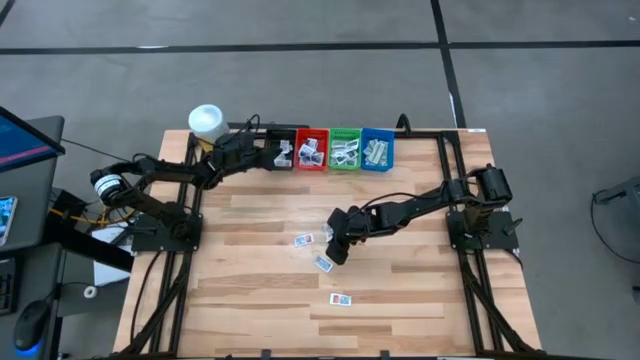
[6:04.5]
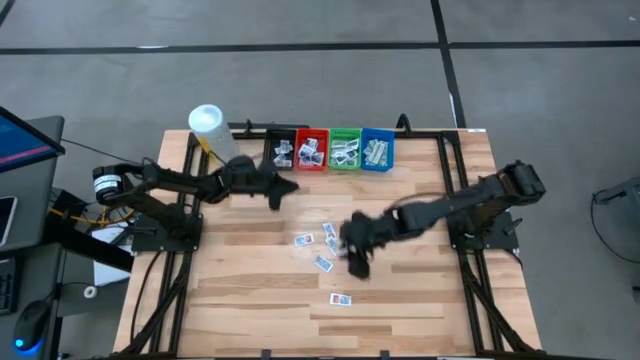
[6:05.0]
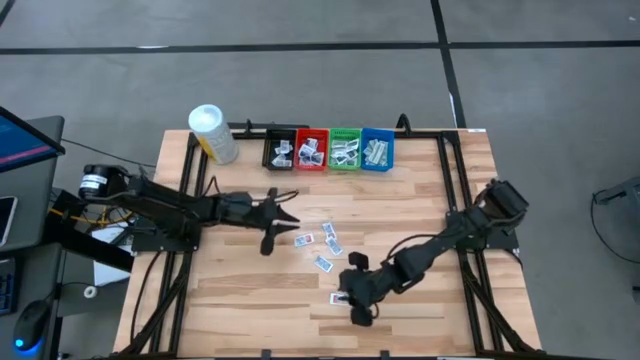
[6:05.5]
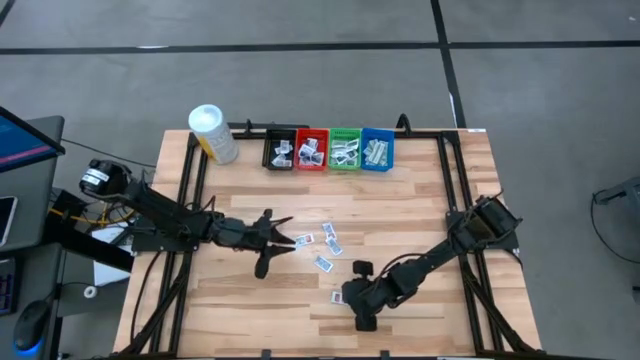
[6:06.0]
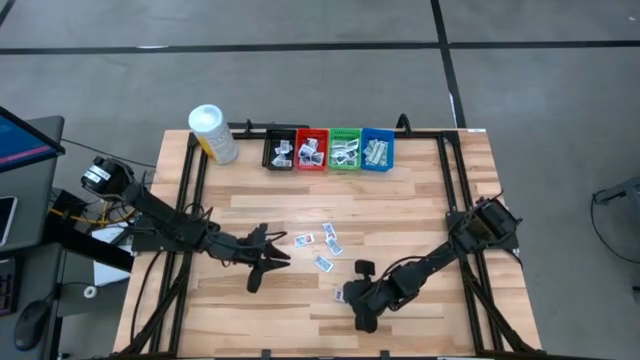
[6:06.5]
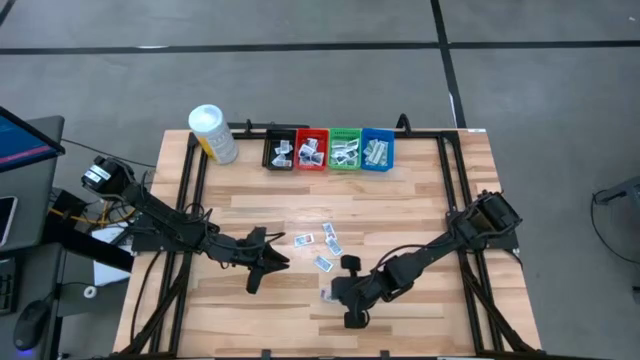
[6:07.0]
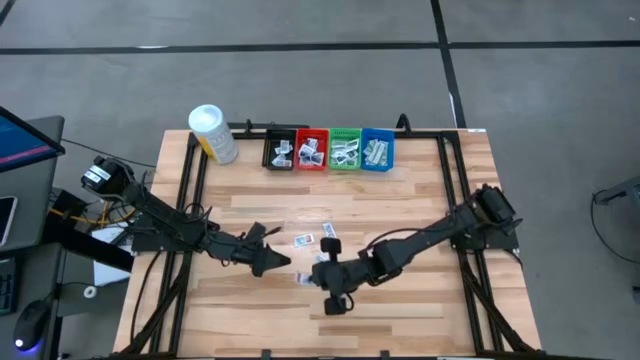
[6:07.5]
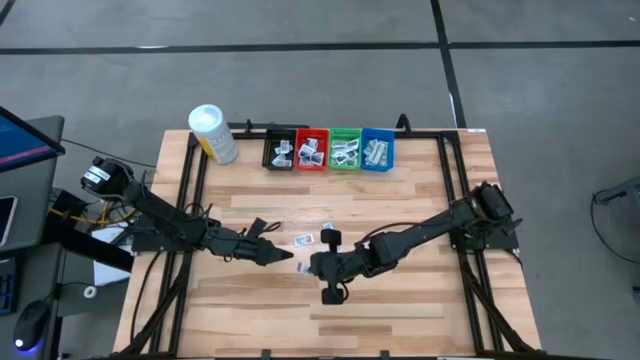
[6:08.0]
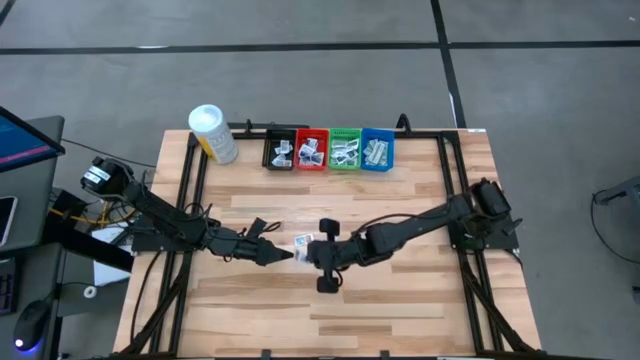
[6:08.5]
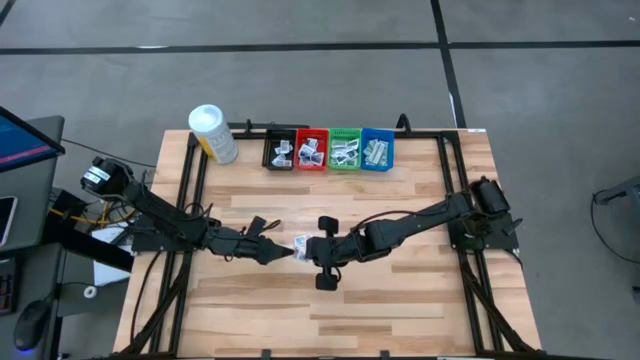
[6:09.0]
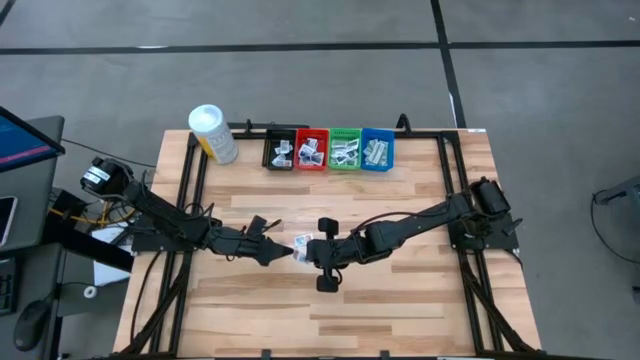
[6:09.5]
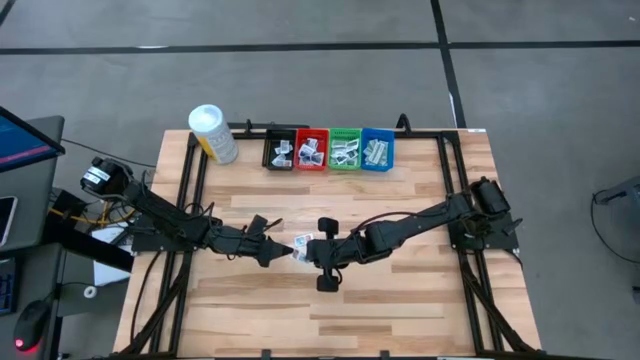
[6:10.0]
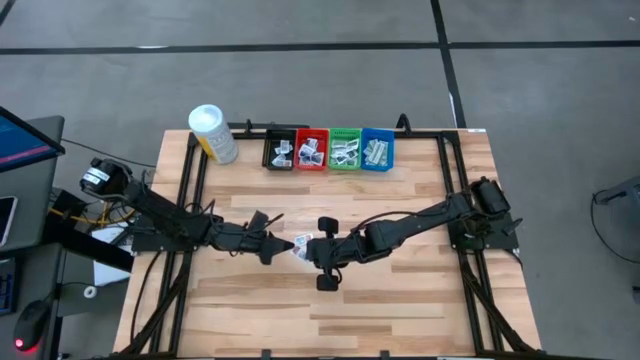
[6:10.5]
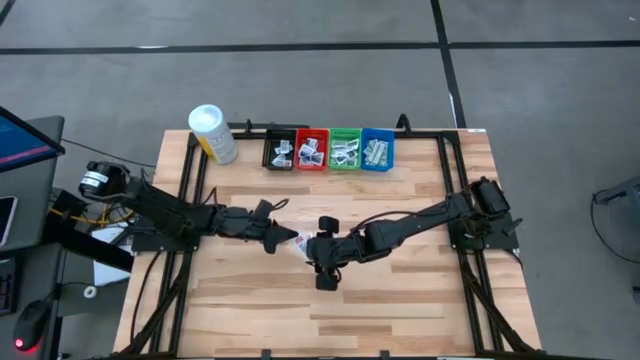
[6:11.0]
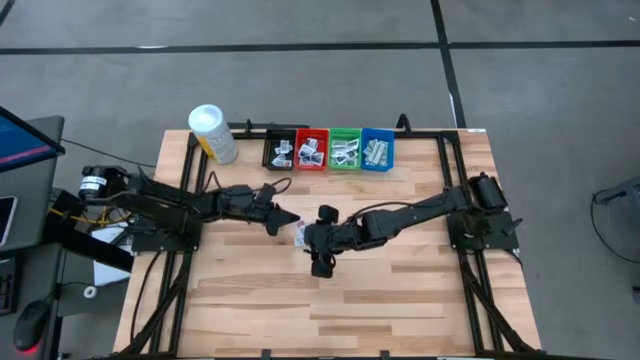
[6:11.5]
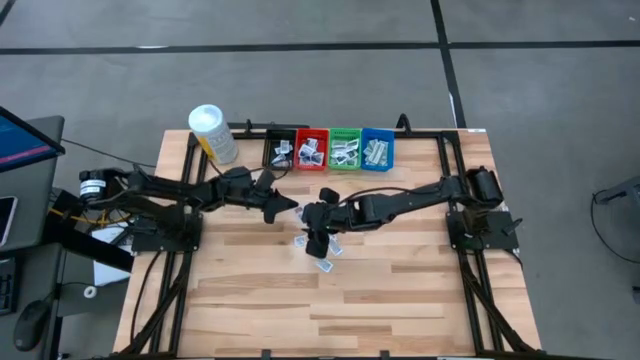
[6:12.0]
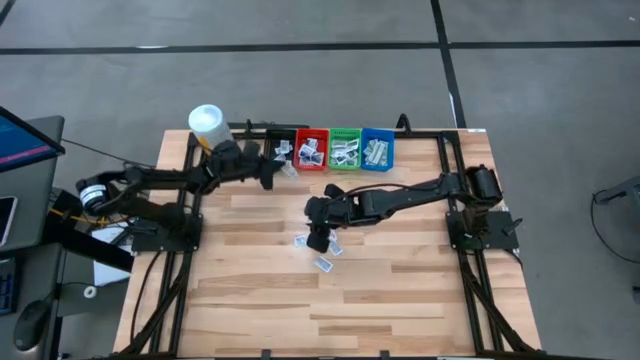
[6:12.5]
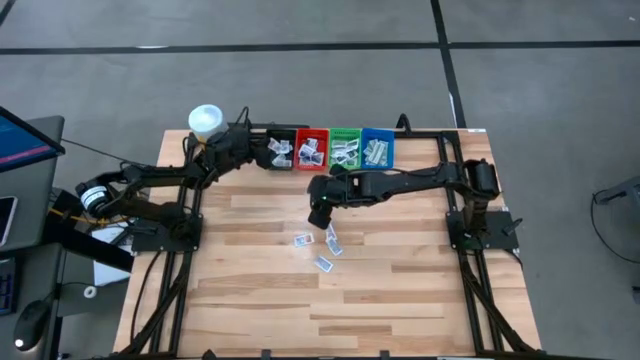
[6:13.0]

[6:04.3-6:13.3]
Task: Pick & Place First Aid Supplies
Put the ointment pack into the black bin

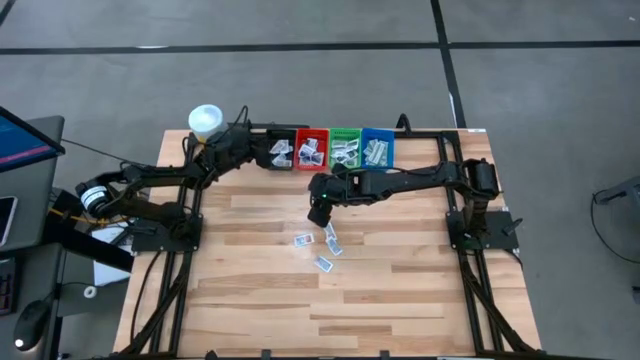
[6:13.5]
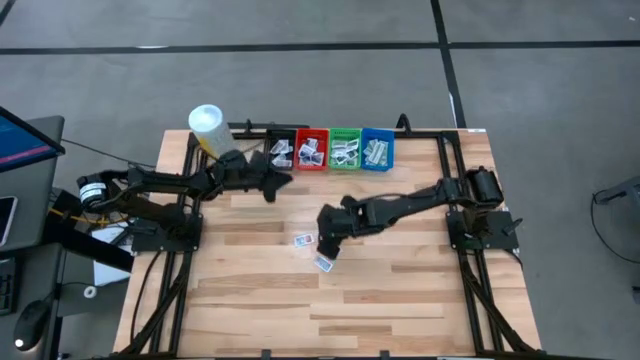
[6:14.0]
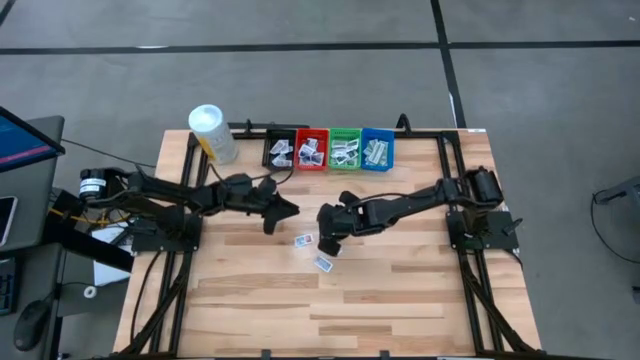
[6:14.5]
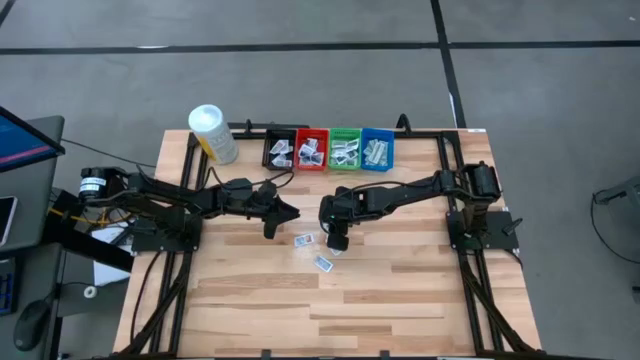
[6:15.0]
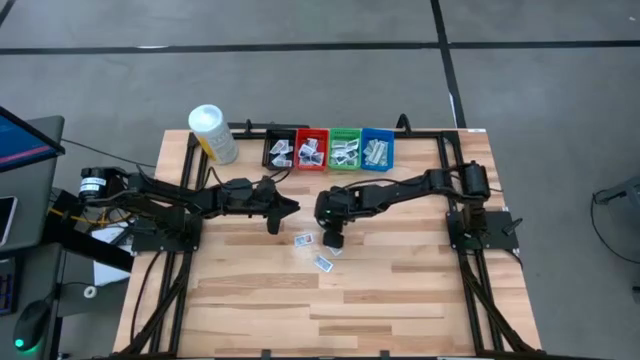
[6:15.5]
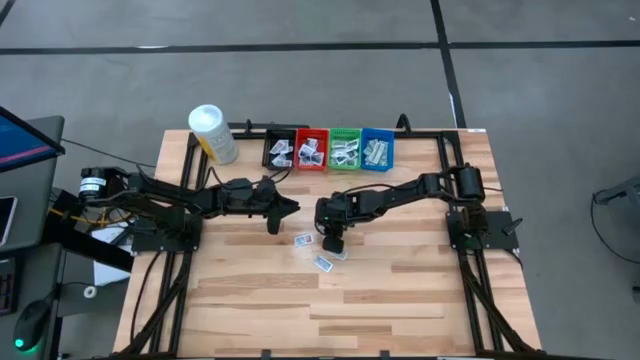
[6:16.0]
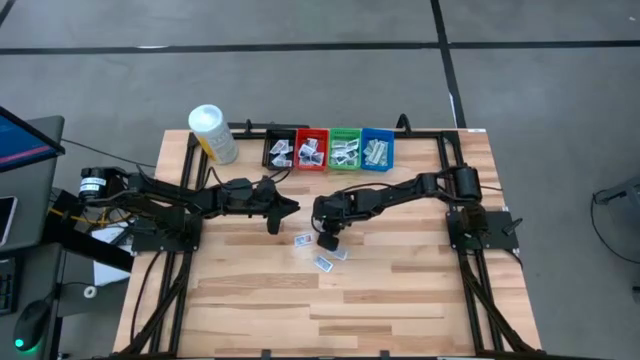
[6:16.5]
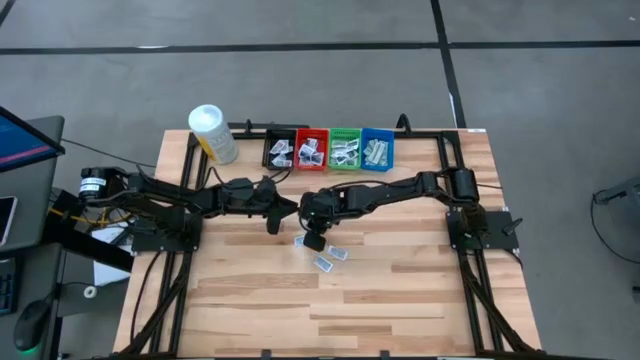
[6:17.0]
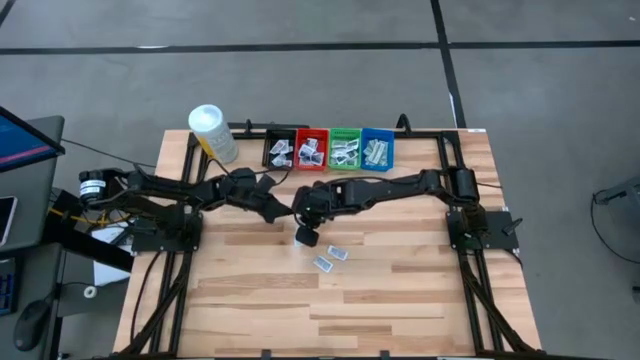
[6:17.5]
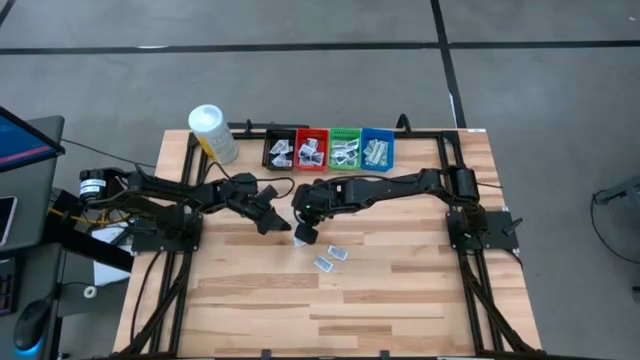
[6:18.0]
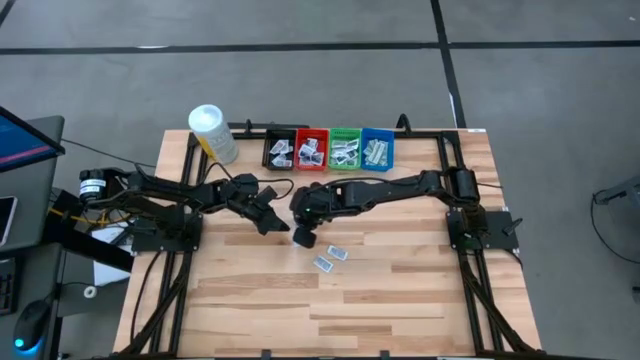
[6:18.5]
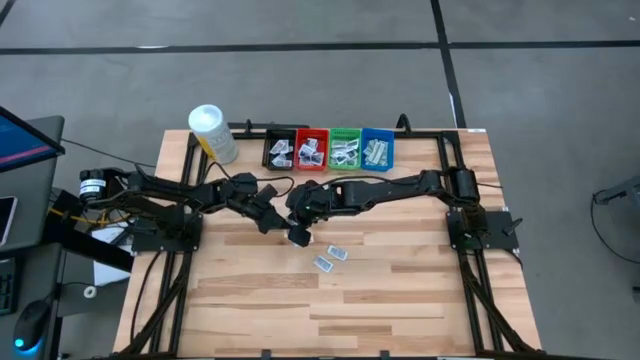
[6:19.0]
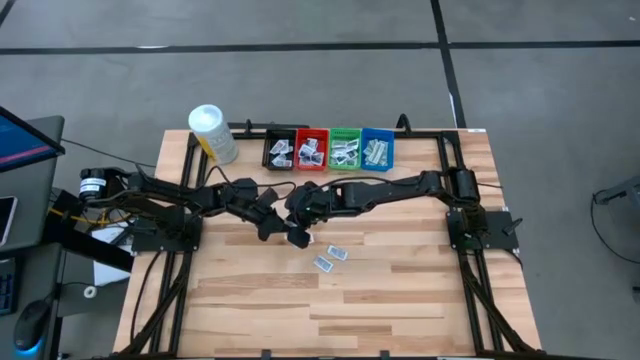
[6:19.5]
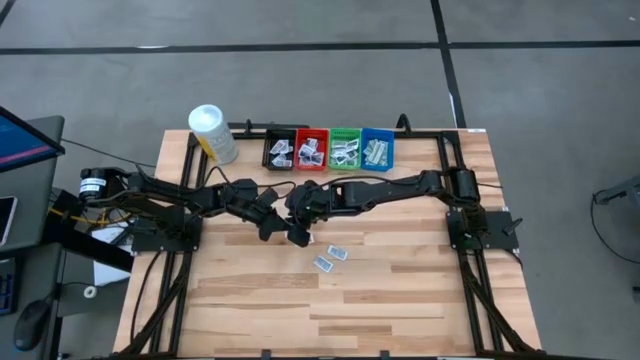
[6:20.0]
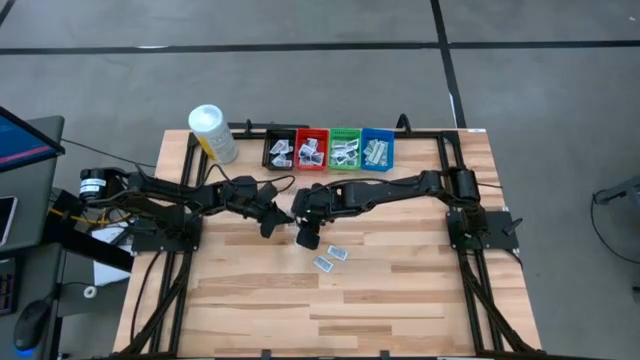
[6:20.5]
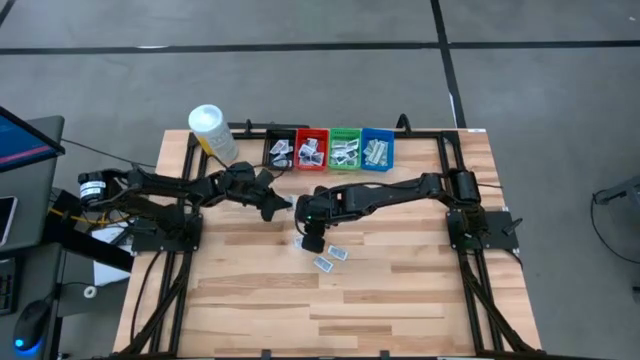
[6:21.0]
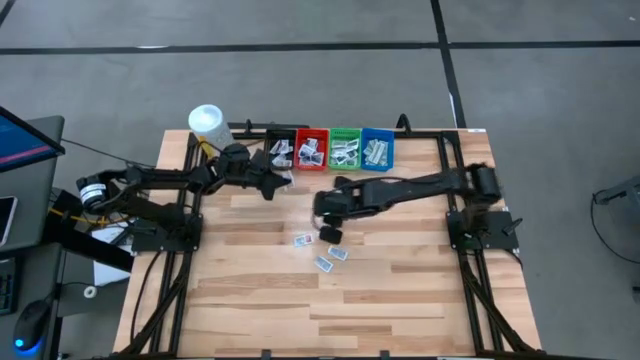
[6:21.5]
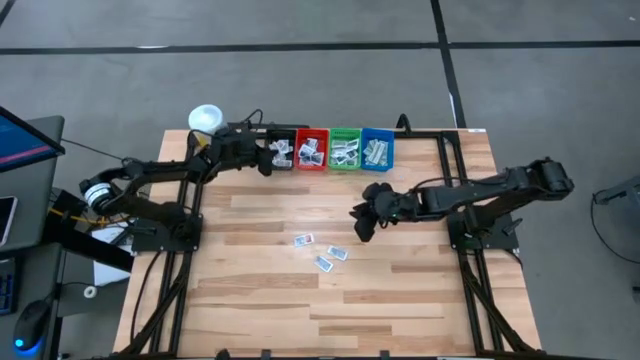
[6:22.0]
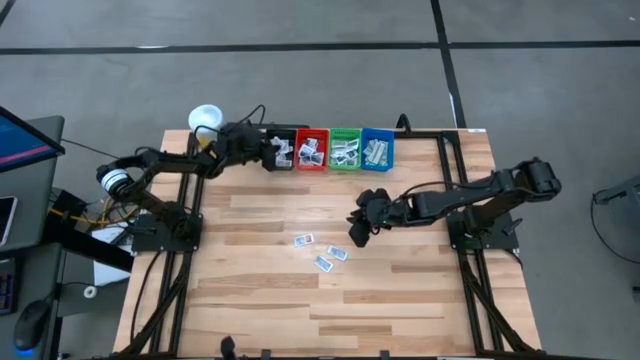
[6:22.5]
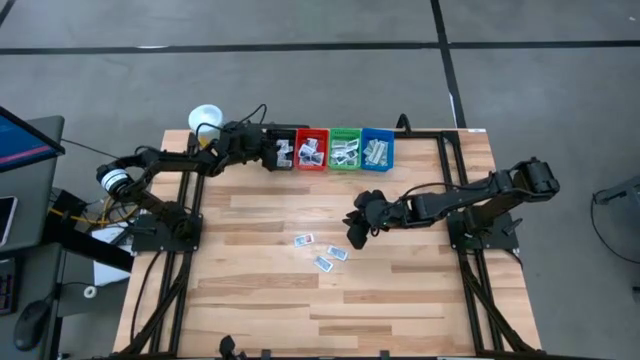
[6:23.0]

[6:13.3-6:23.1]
Put the ointment pack into the black bin

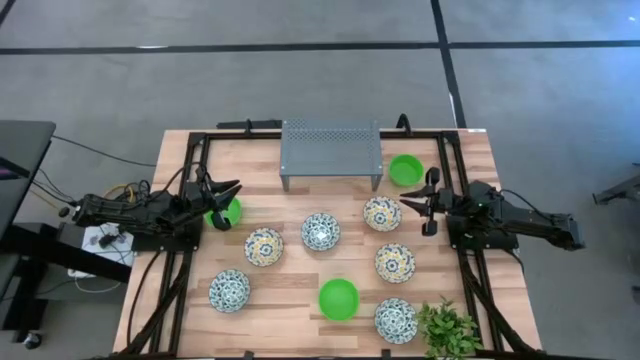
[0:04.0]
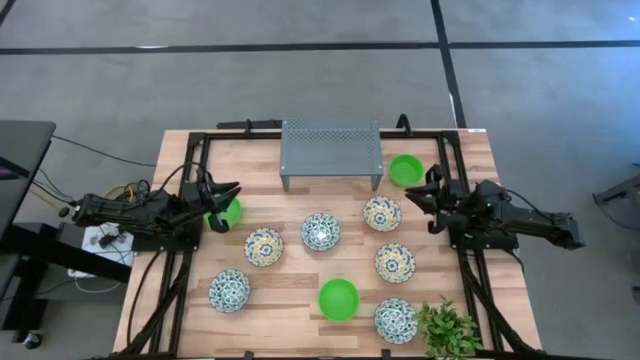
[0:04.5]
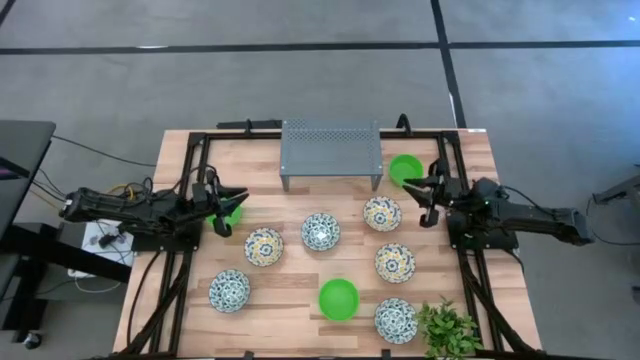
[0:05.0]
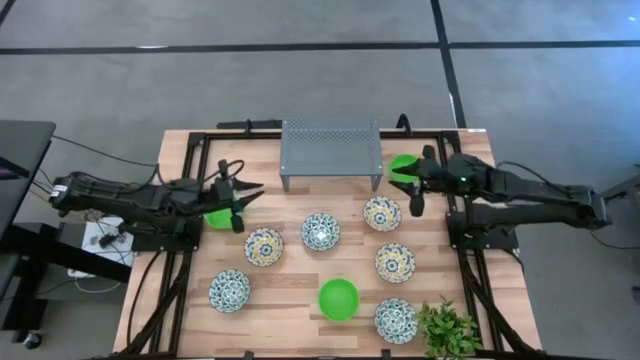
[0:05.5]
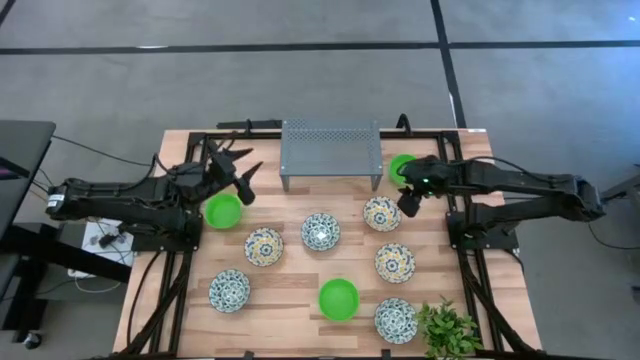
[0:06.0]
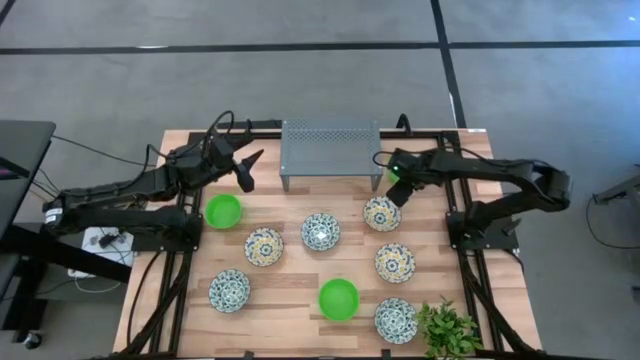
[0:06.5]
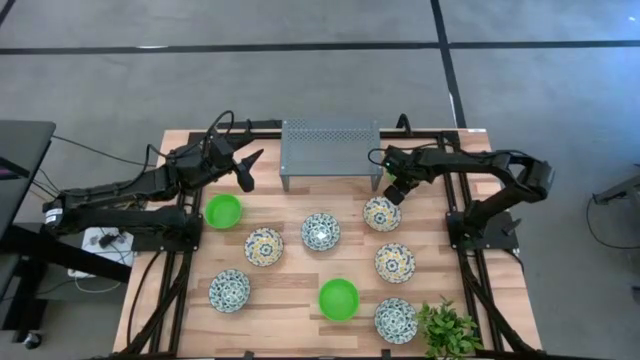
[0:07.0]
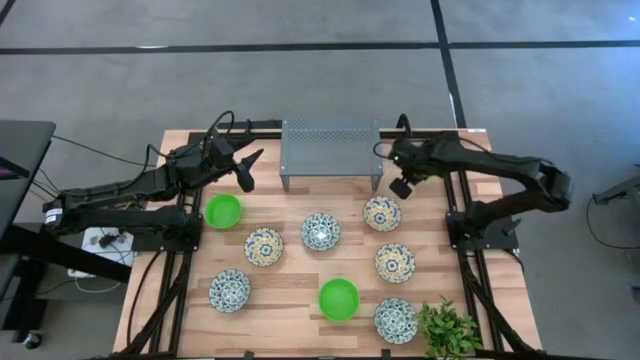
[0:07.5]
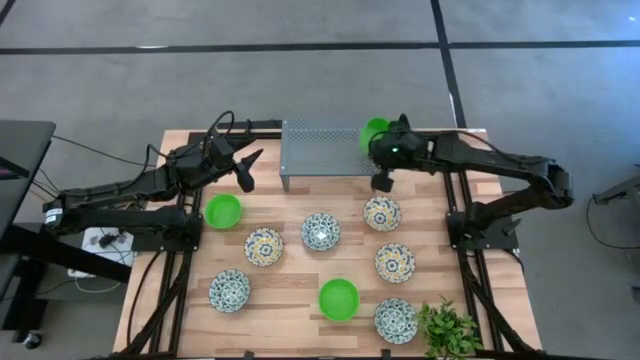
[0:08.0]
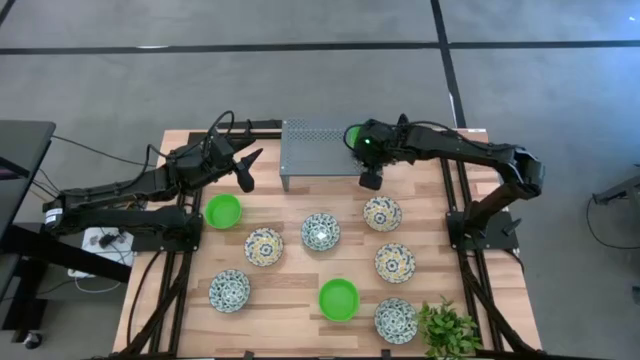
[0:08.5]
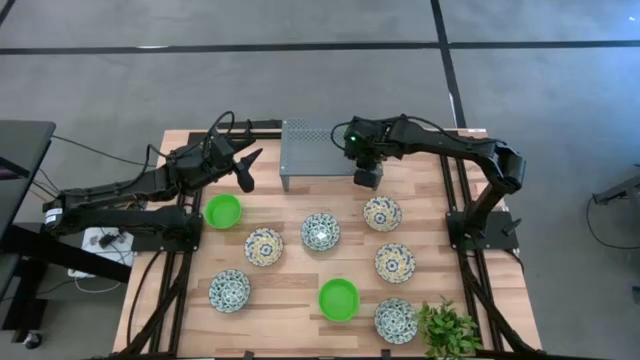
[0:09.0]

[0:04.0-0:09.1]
Task: Pick & Place Mini bowls
Put the top right green bowl on the shelf
